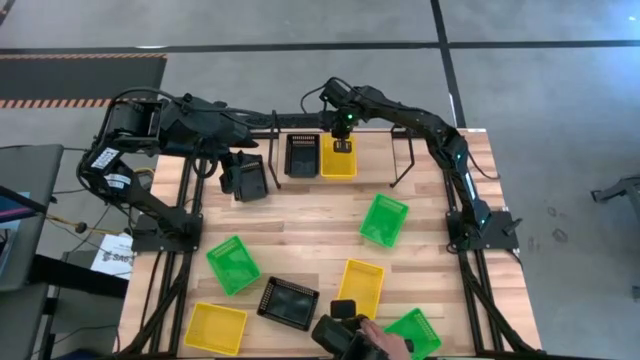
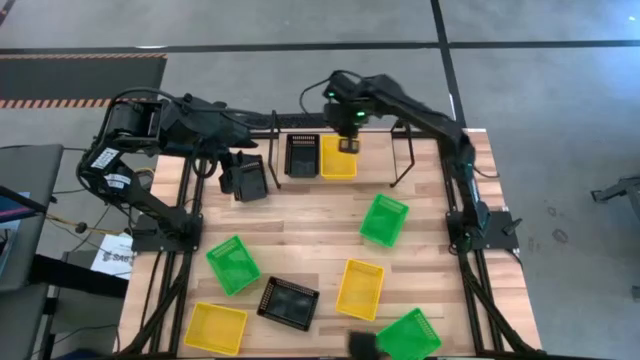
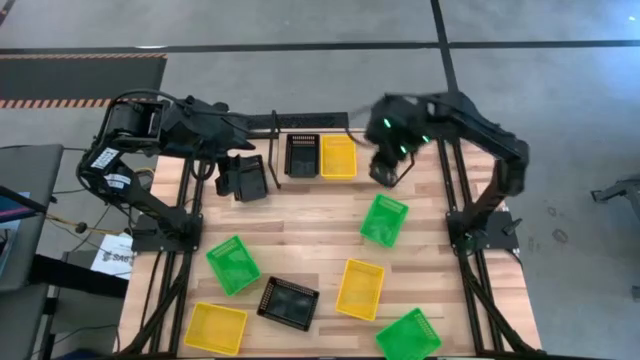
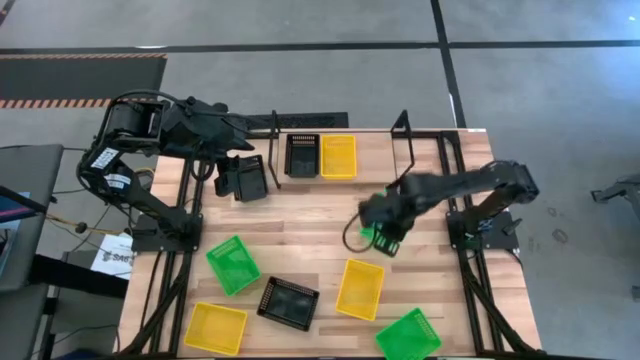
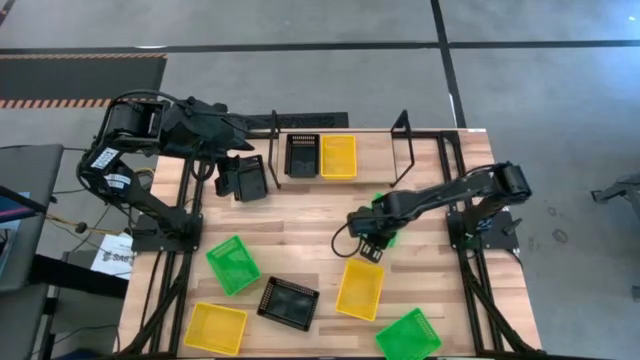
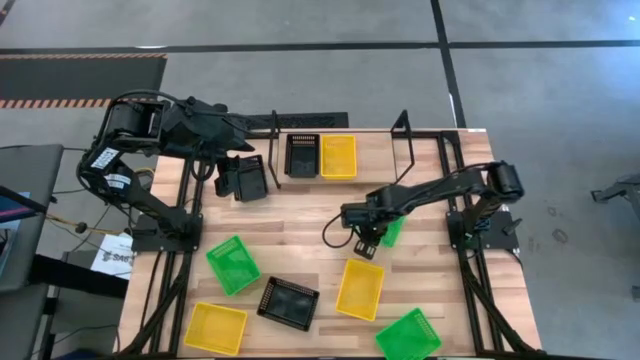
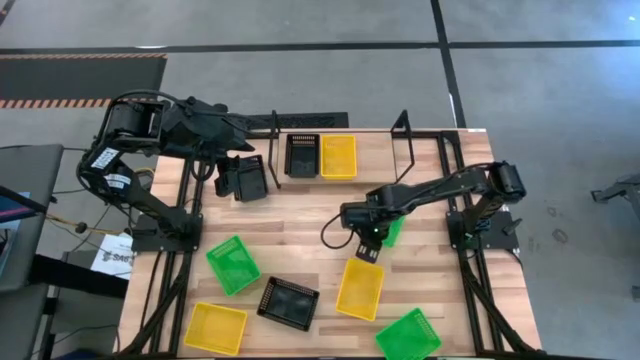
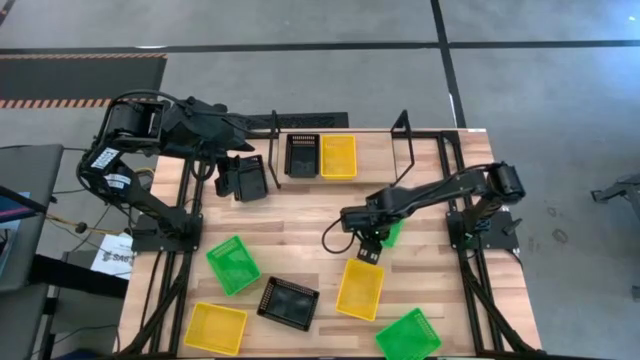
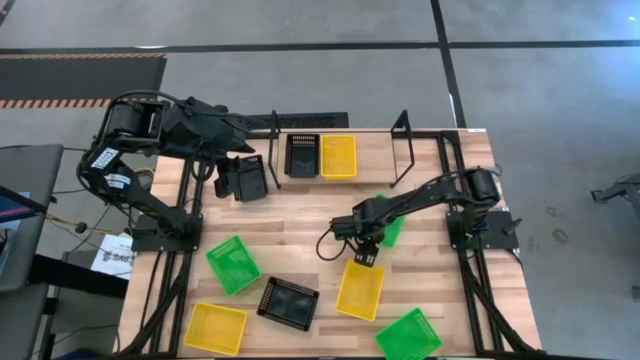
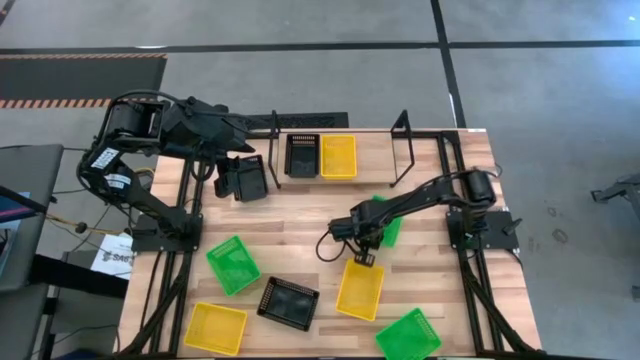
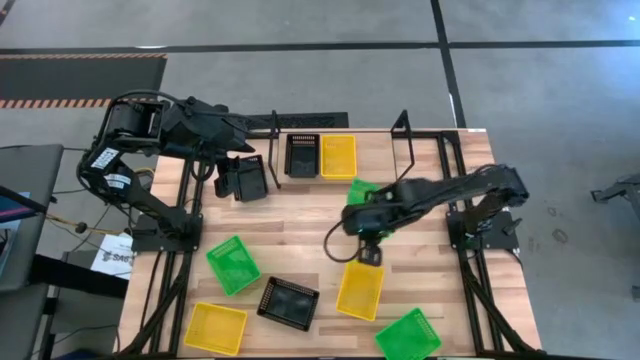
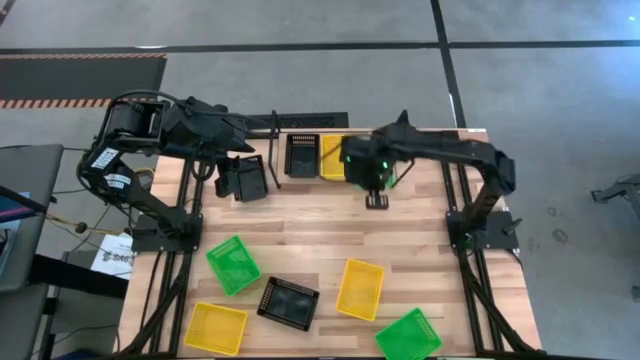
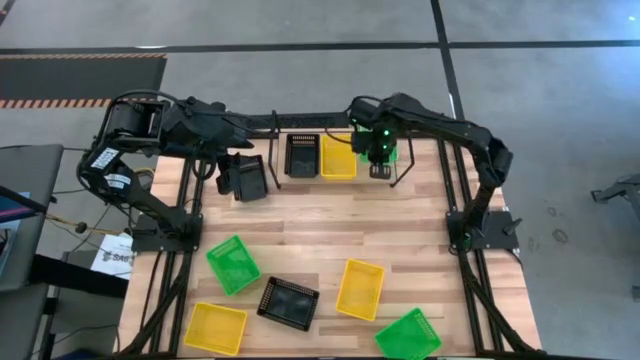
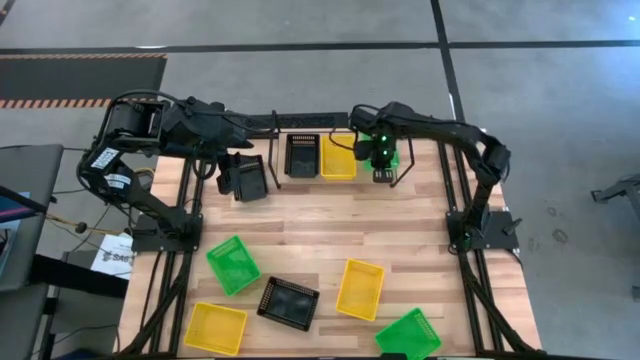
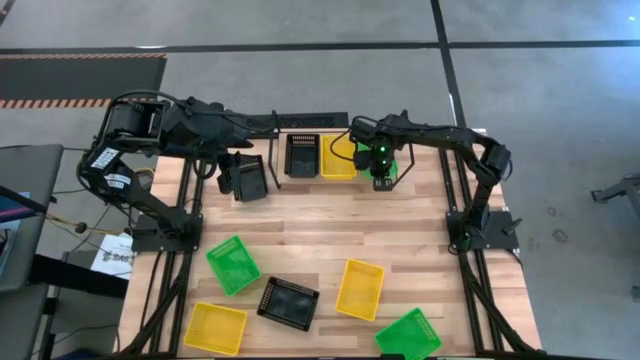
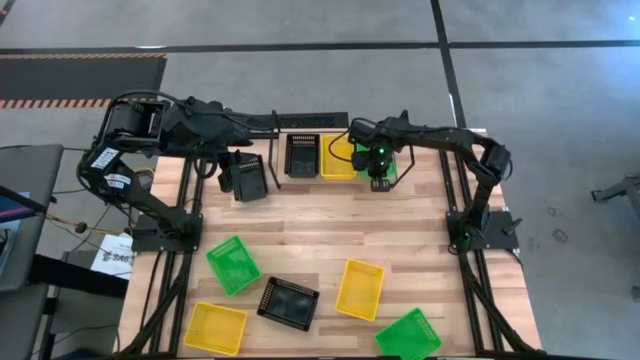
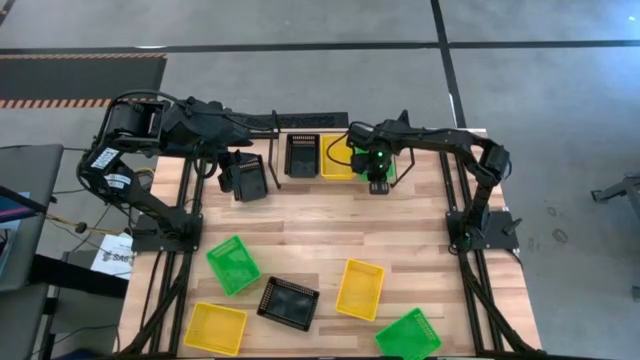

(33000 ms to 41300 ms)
Task: Stack baskets on shelf by color
Put the top right green bin on the shelf

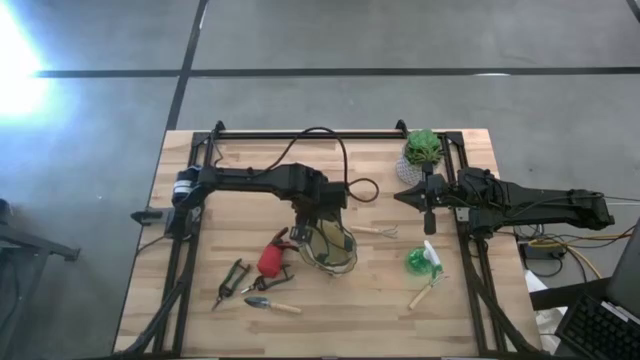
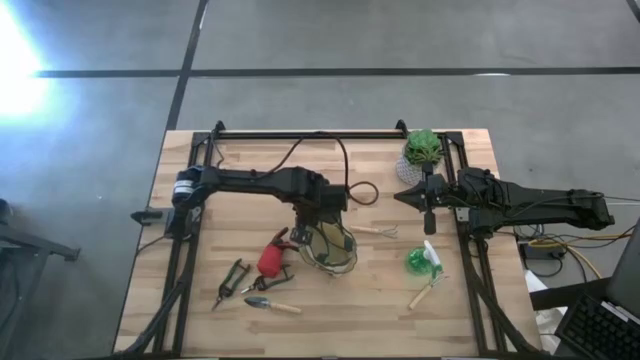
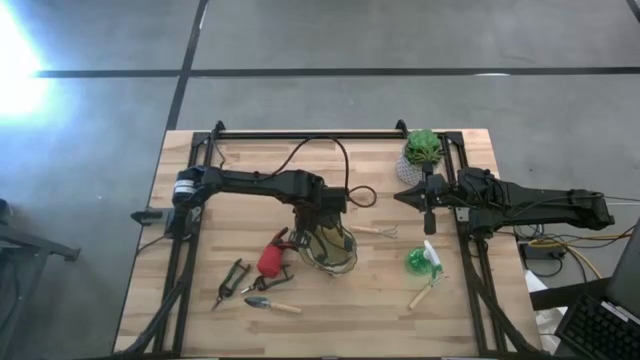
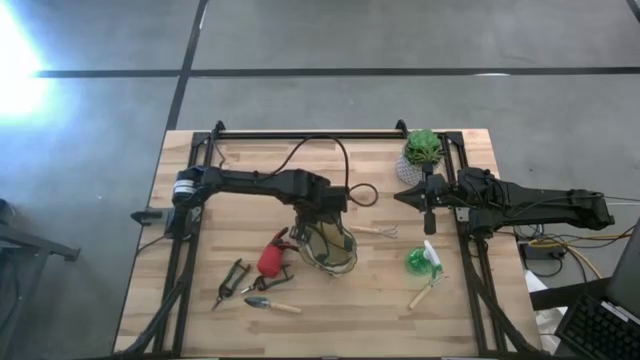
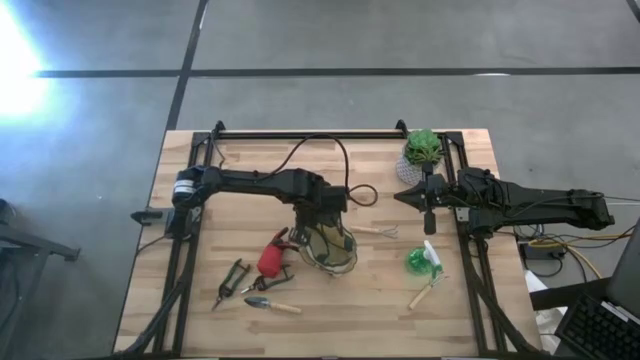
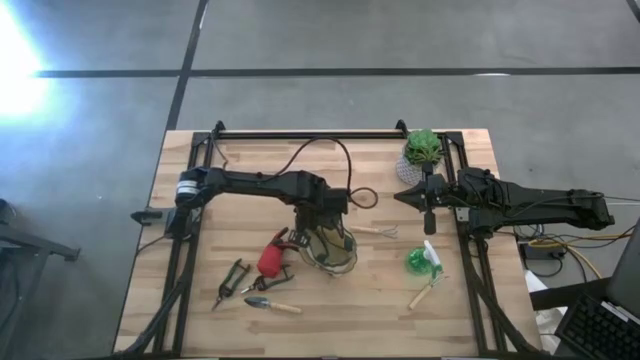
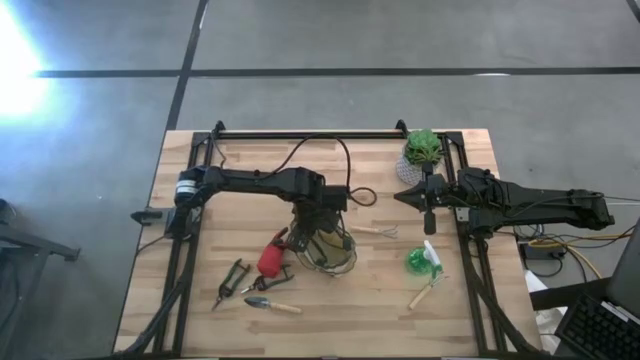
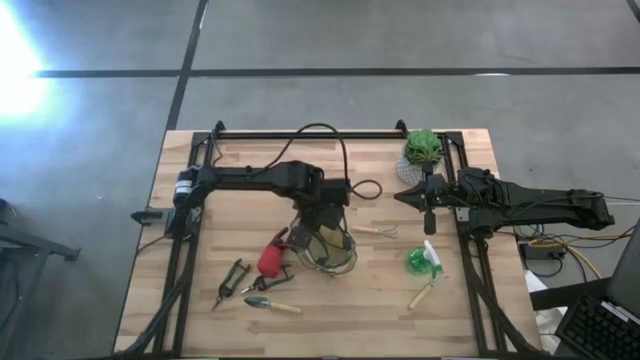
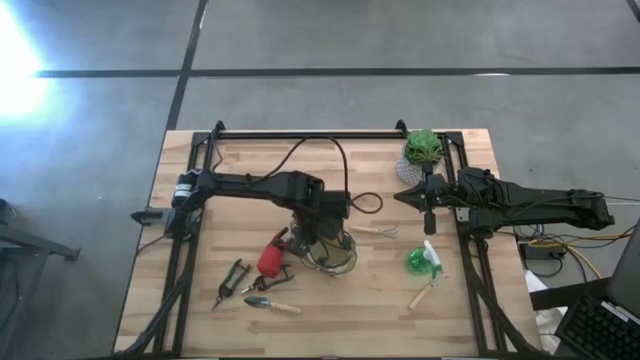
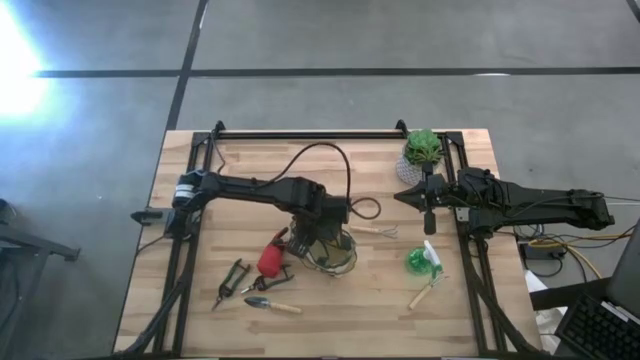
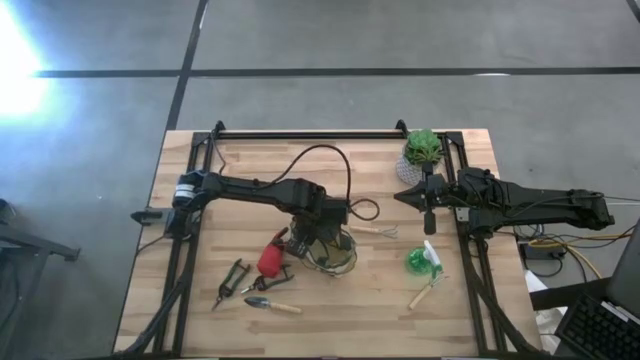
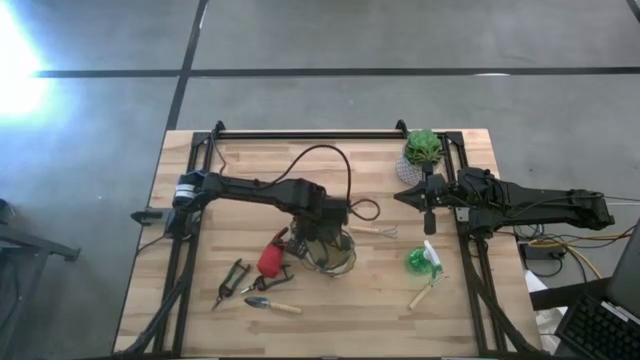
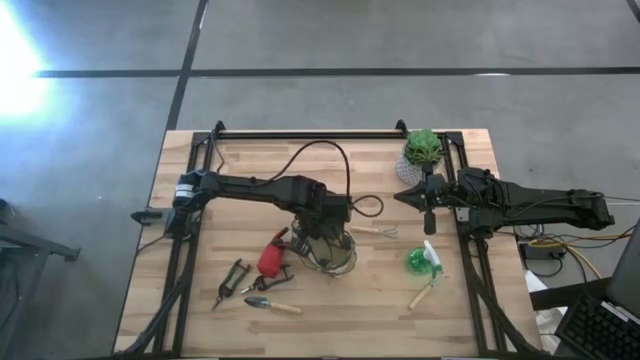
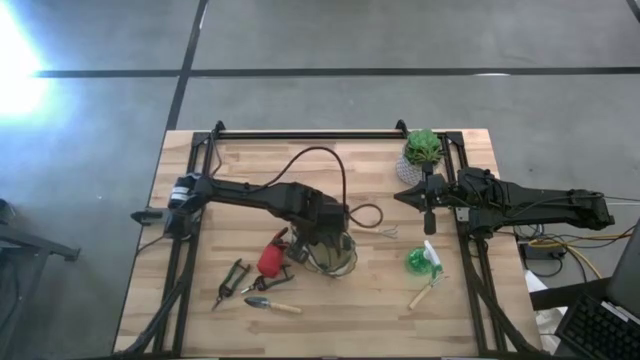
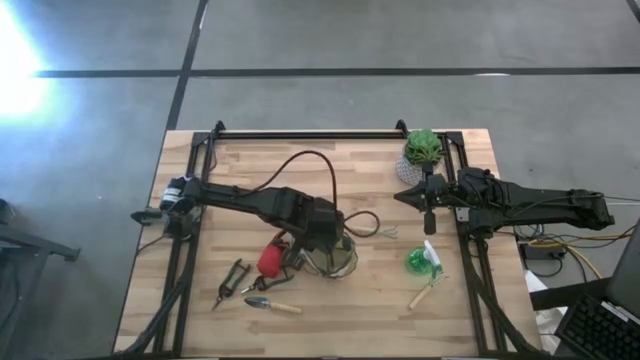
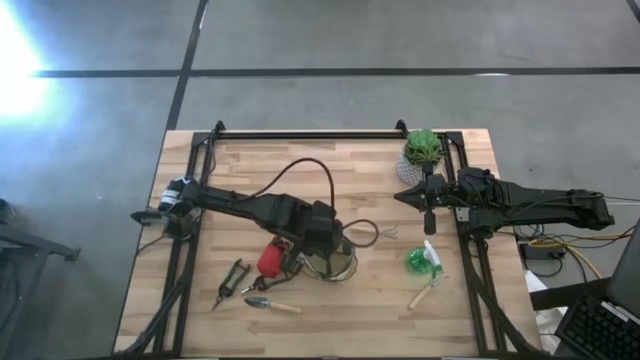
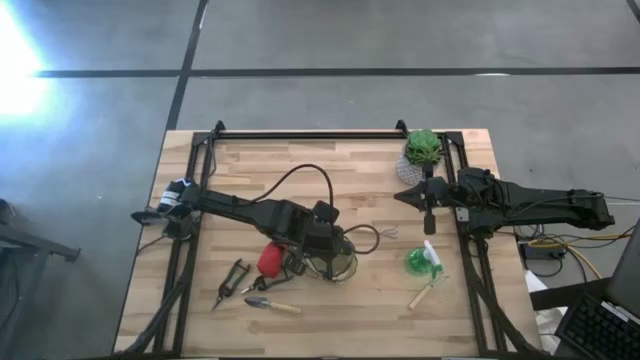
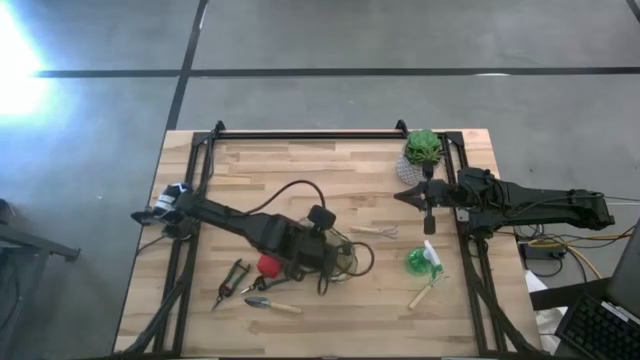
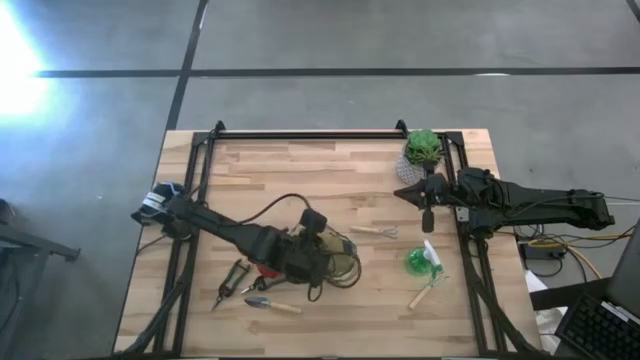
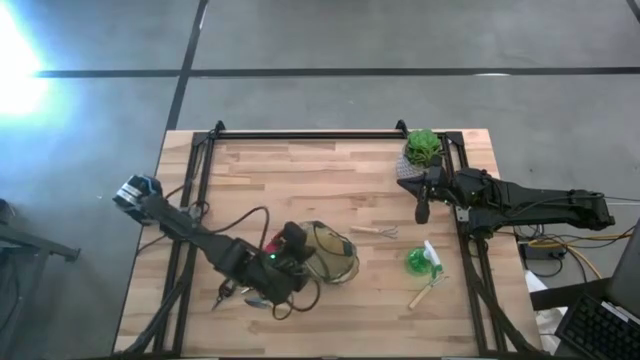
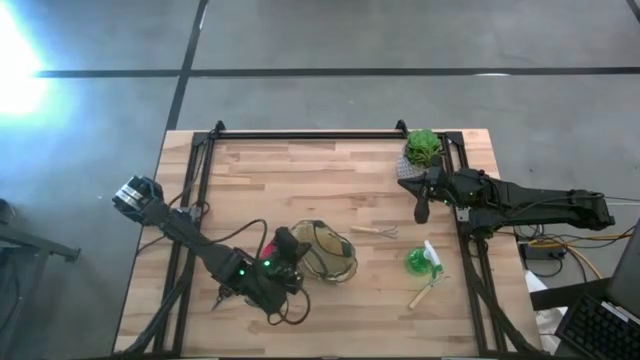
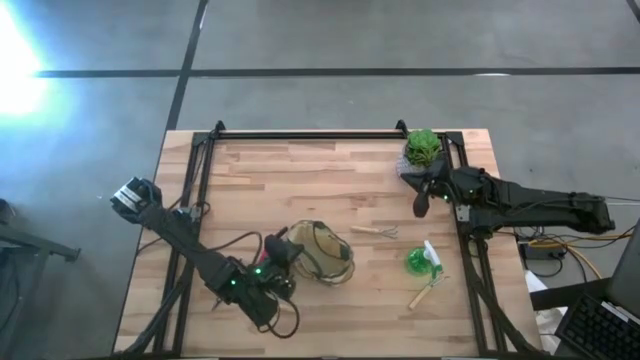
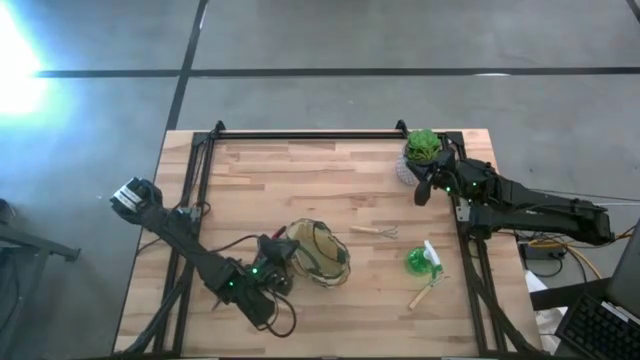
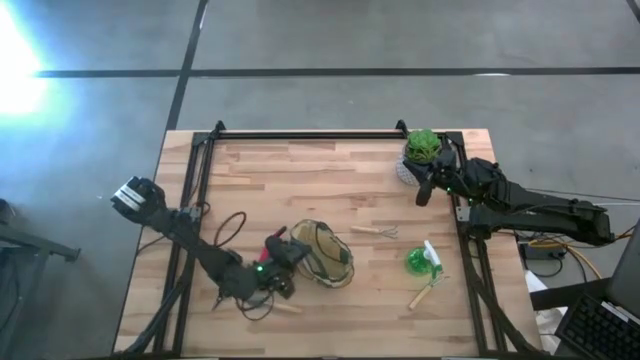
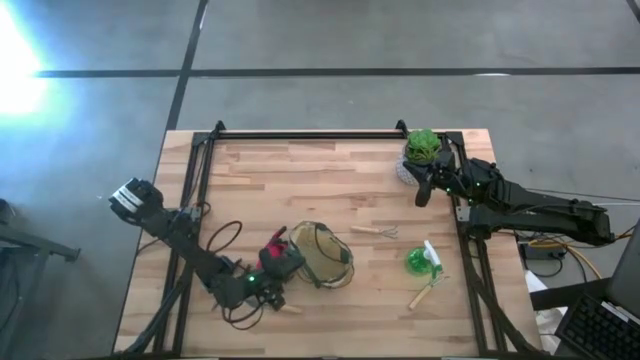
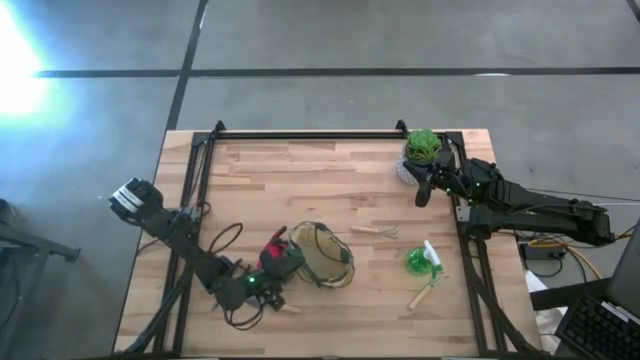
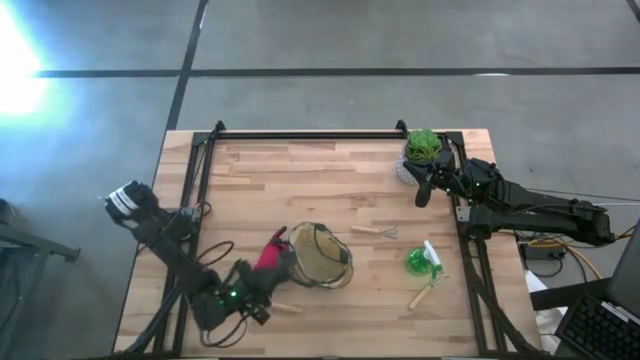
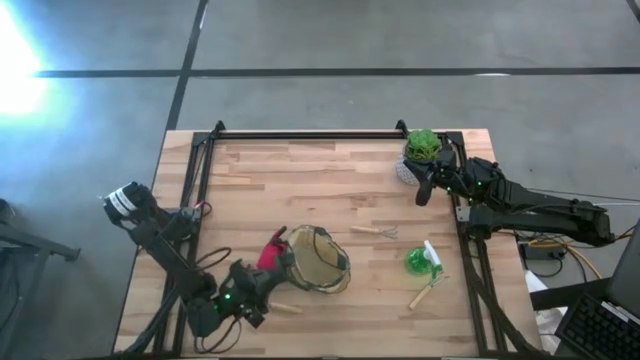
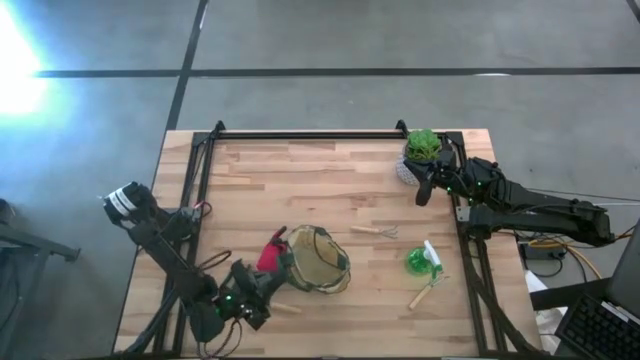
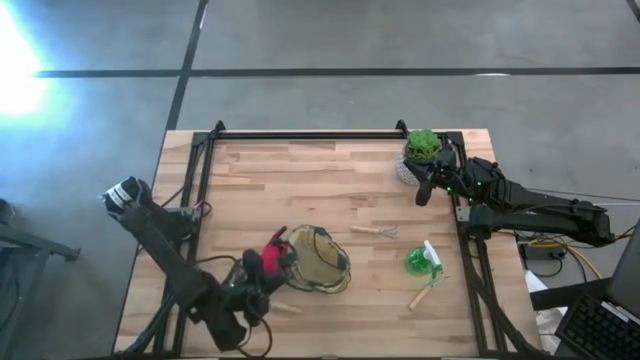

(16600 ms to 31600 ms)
Task: Pick & Place Garden tools in Gardening bag
Prepare the light brown gardening bag on the table
